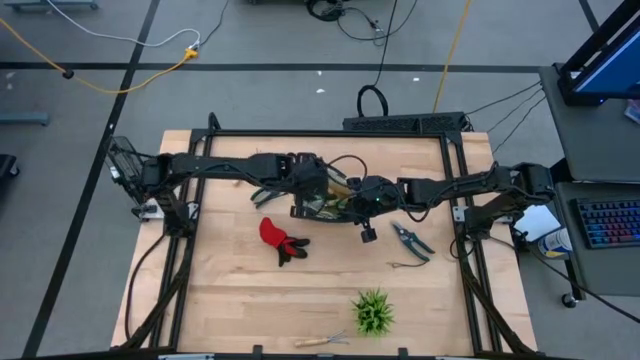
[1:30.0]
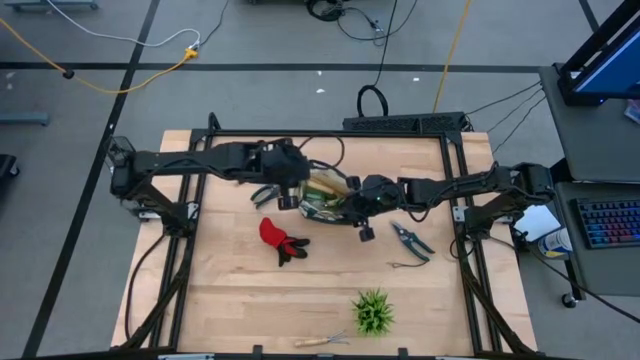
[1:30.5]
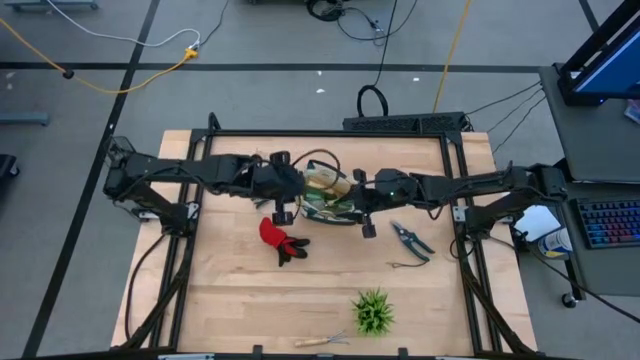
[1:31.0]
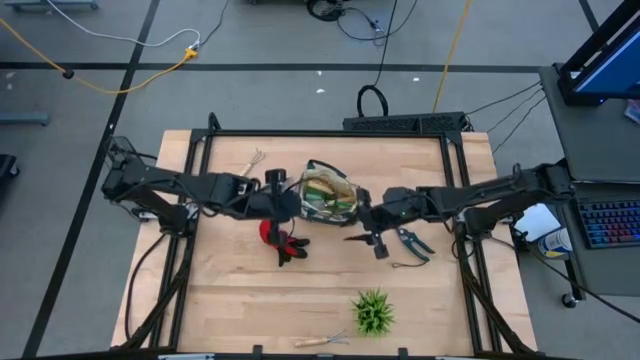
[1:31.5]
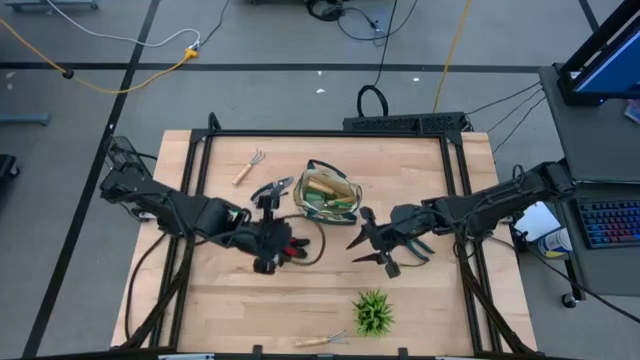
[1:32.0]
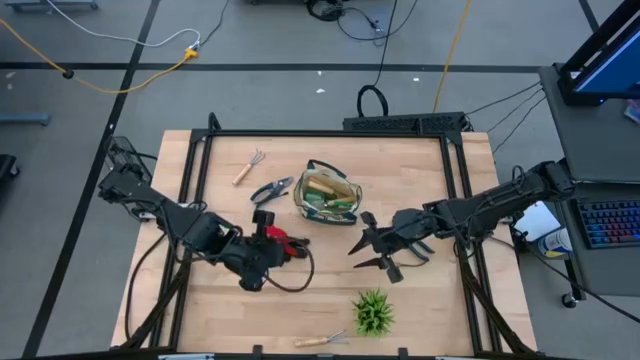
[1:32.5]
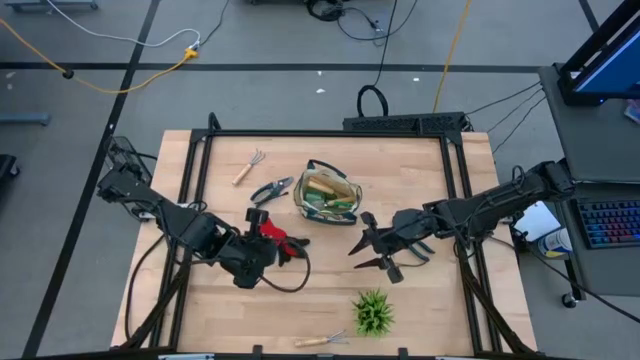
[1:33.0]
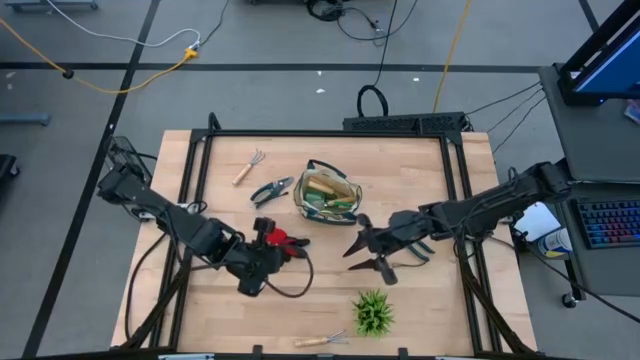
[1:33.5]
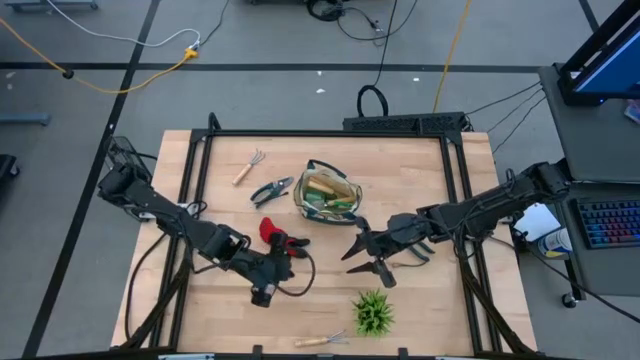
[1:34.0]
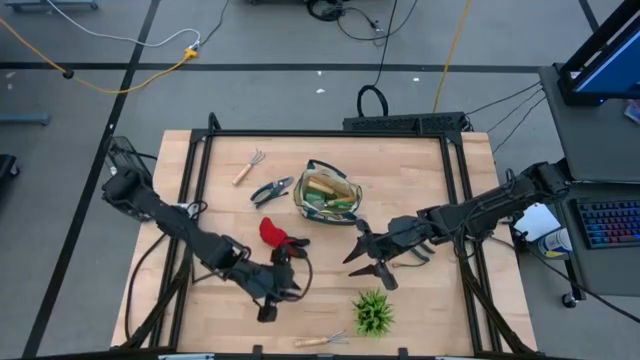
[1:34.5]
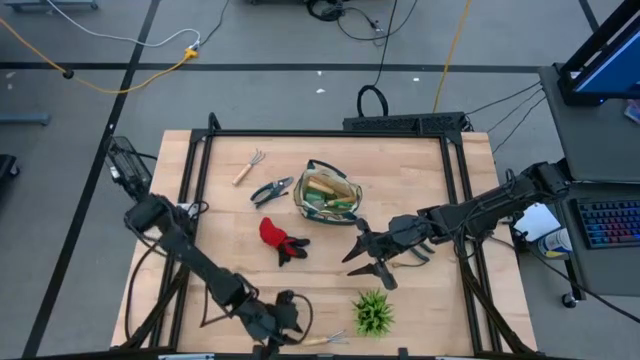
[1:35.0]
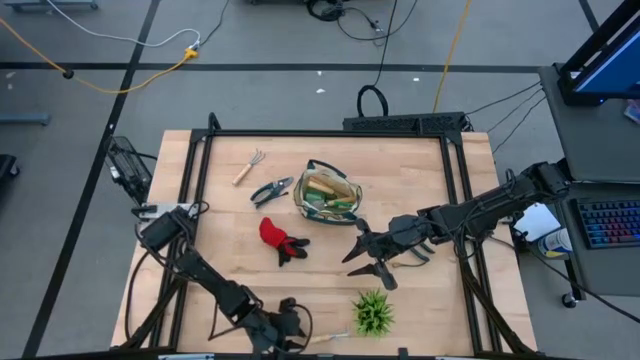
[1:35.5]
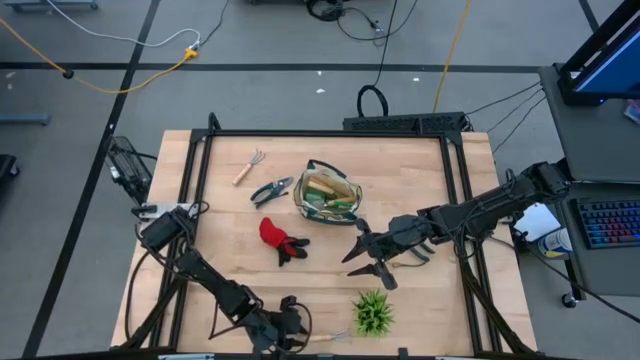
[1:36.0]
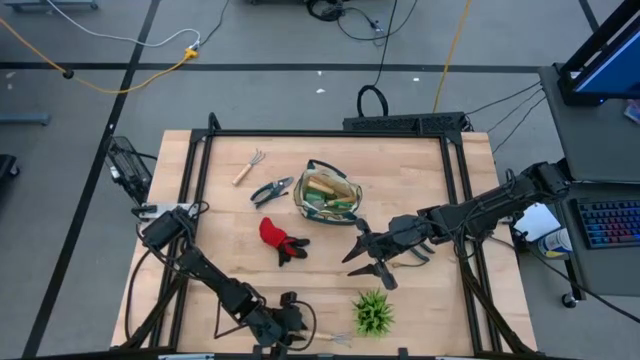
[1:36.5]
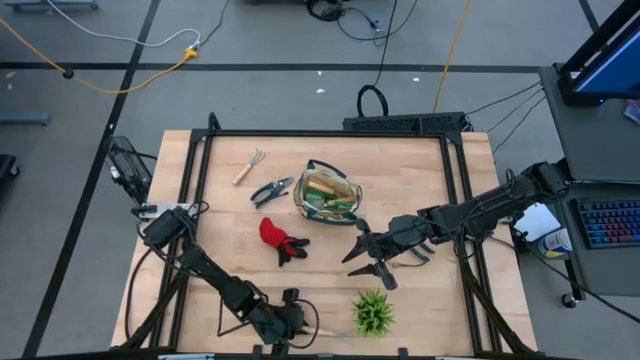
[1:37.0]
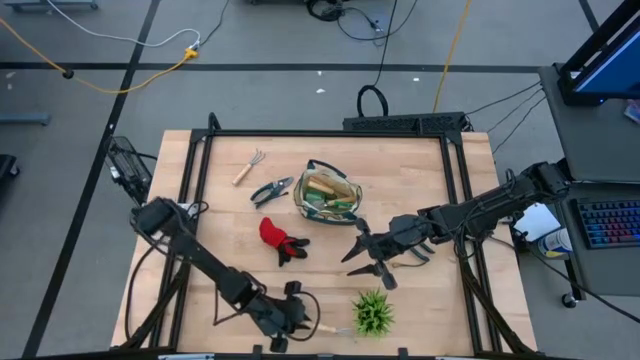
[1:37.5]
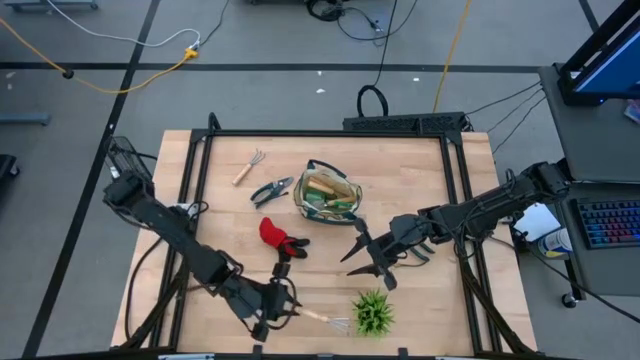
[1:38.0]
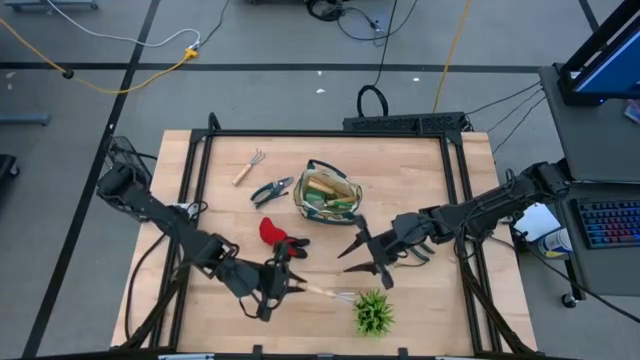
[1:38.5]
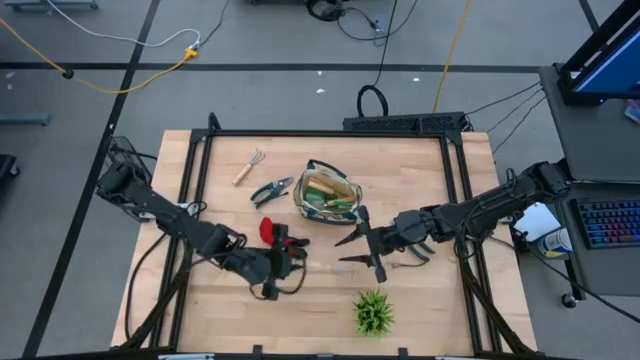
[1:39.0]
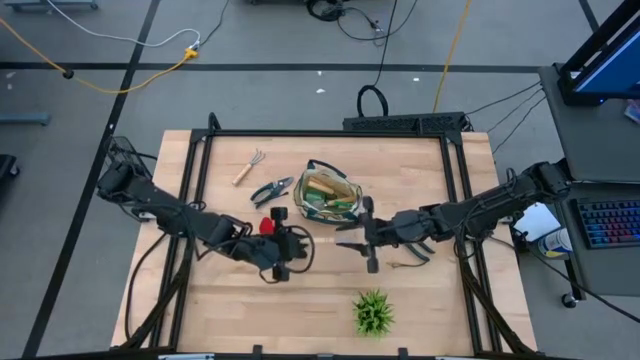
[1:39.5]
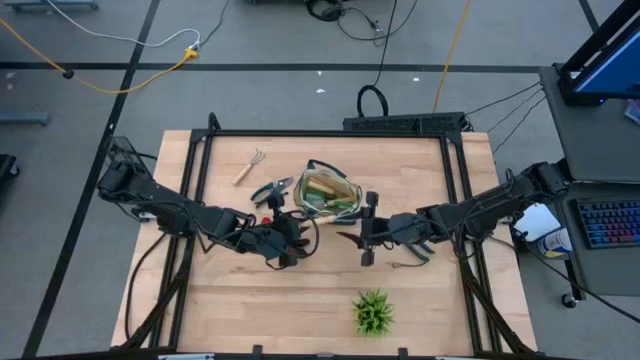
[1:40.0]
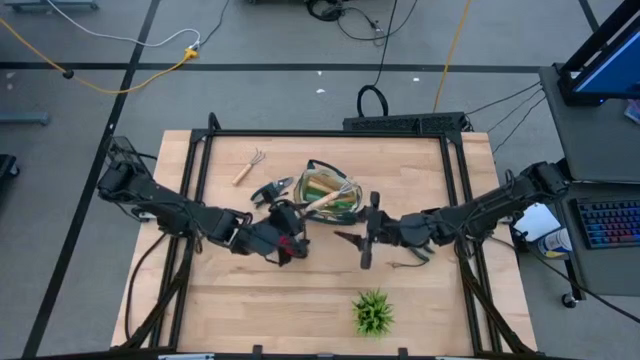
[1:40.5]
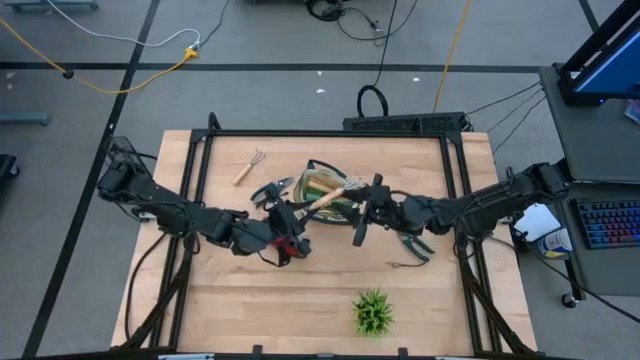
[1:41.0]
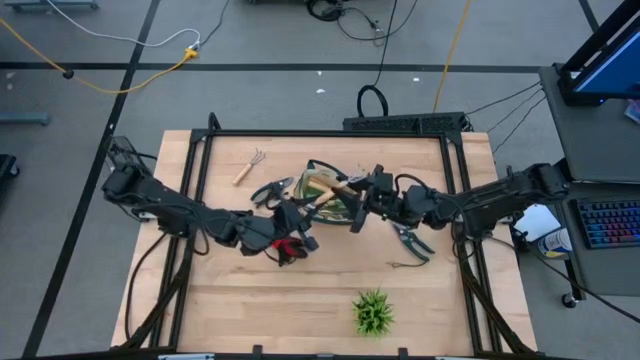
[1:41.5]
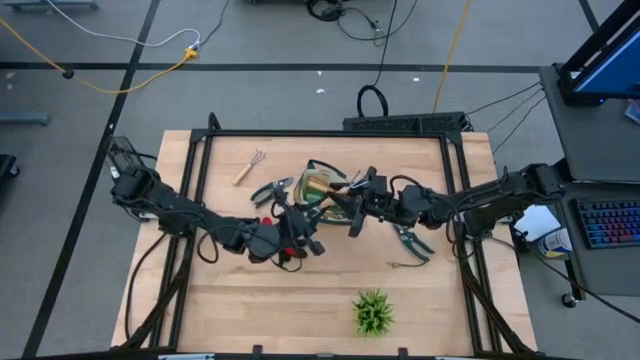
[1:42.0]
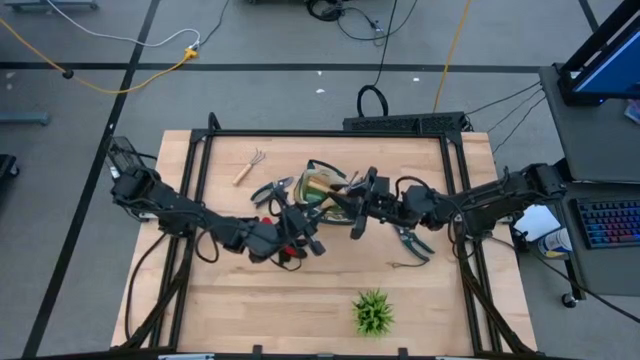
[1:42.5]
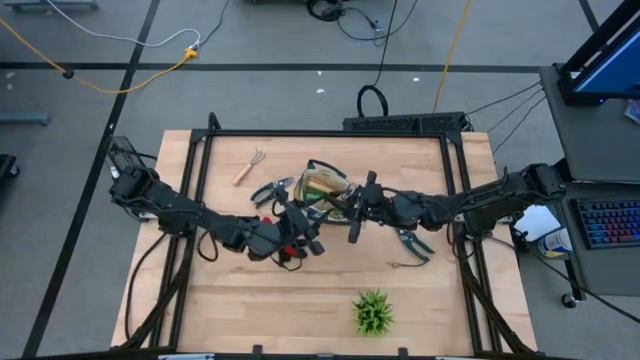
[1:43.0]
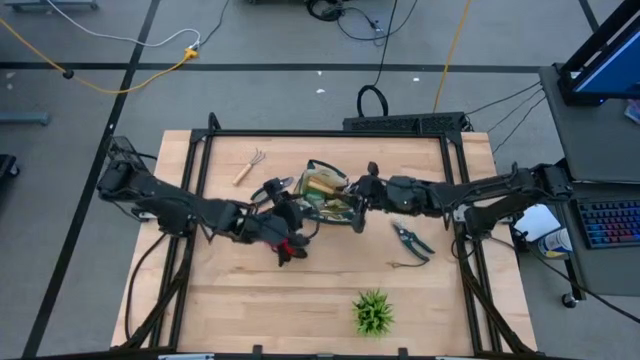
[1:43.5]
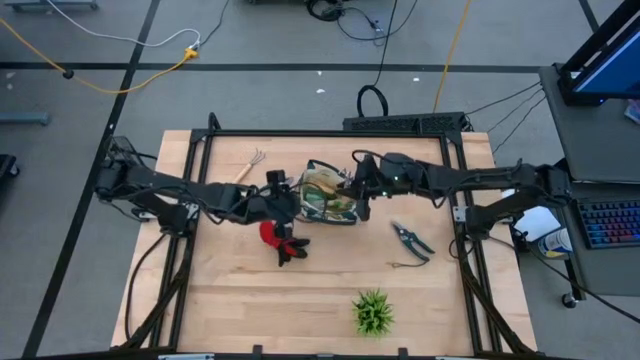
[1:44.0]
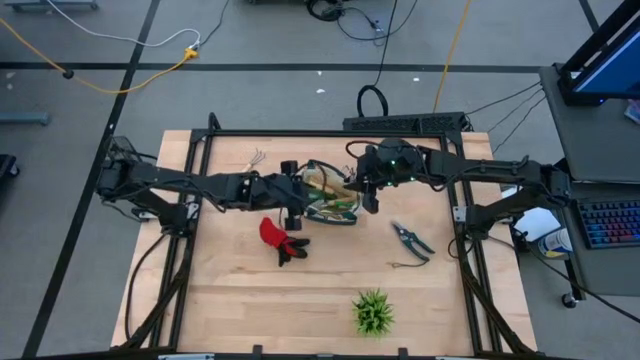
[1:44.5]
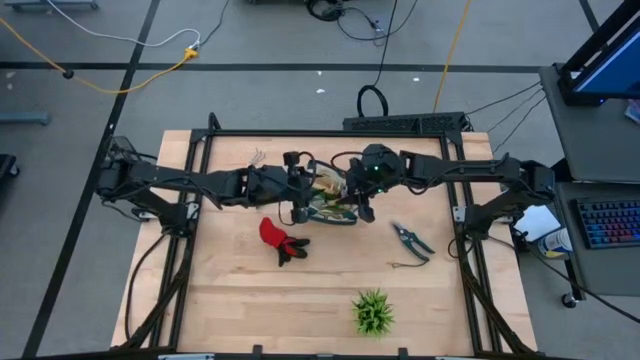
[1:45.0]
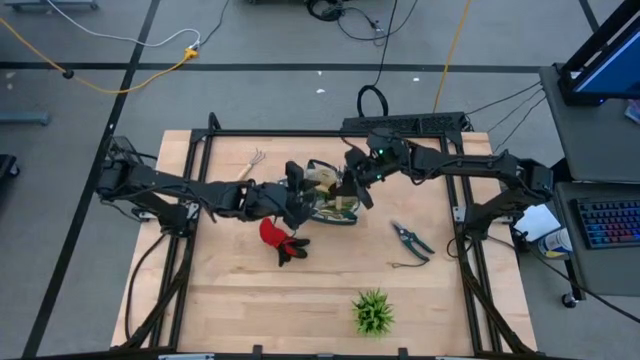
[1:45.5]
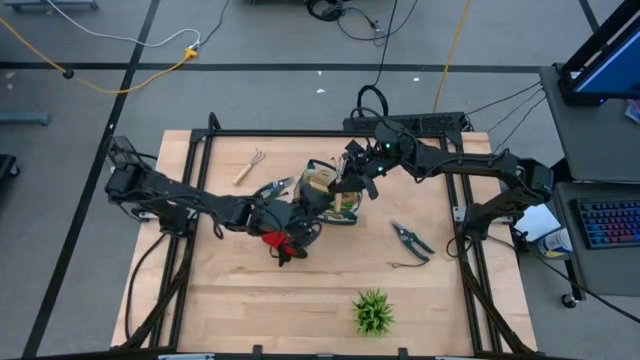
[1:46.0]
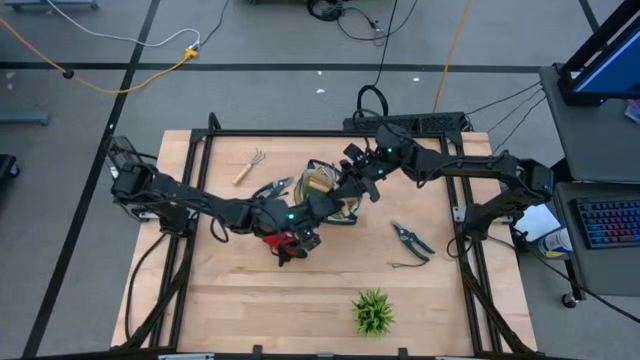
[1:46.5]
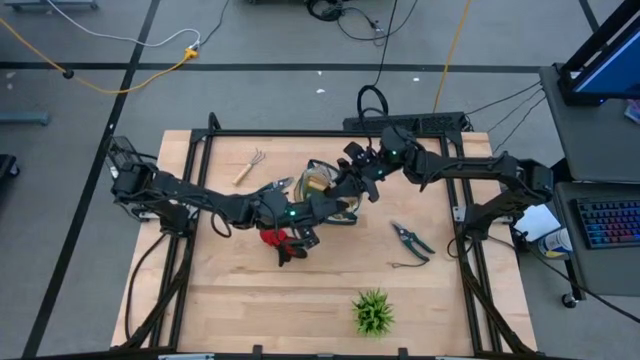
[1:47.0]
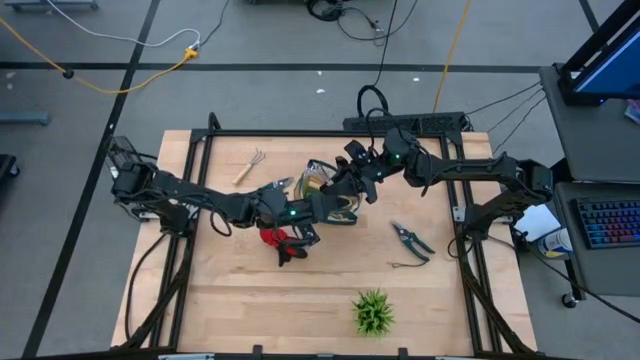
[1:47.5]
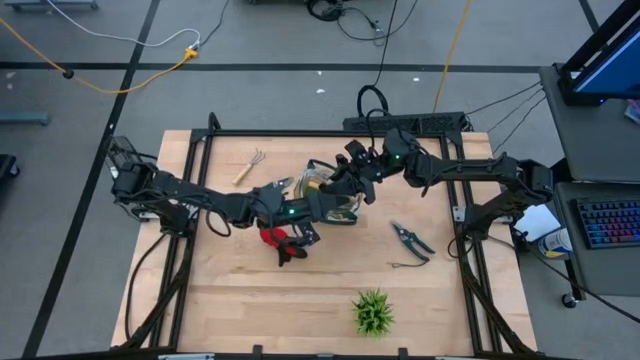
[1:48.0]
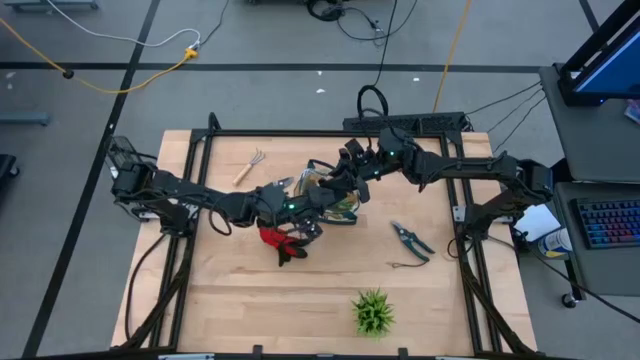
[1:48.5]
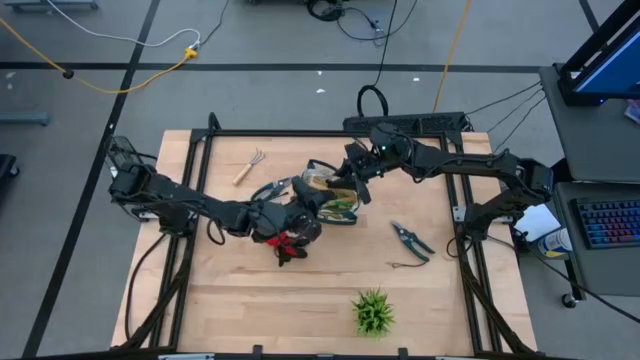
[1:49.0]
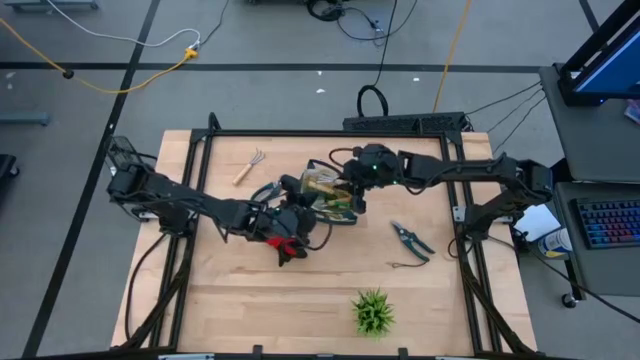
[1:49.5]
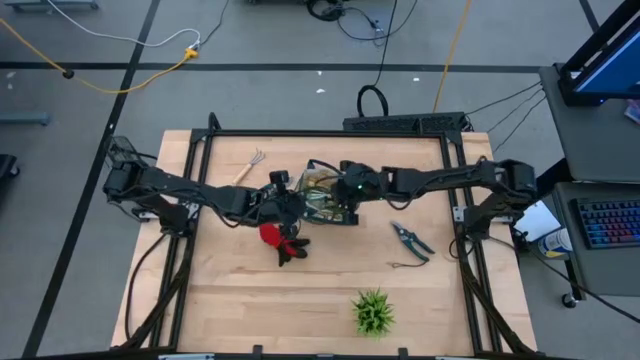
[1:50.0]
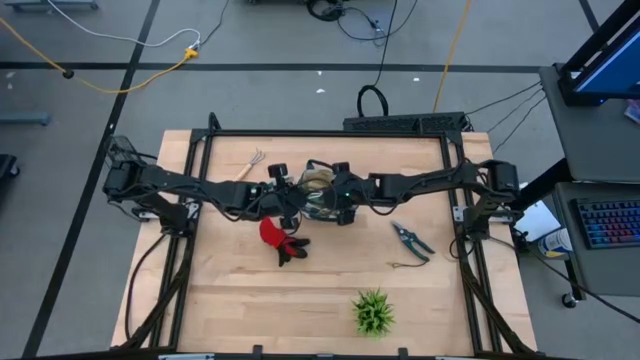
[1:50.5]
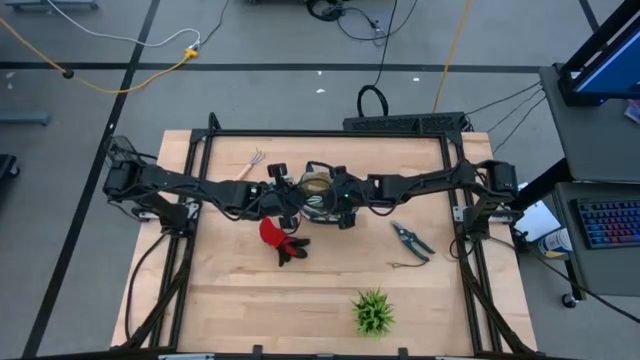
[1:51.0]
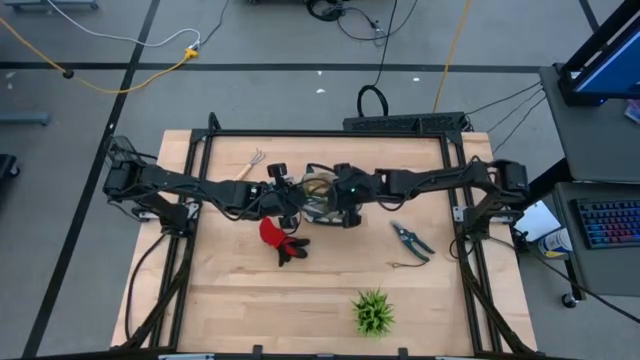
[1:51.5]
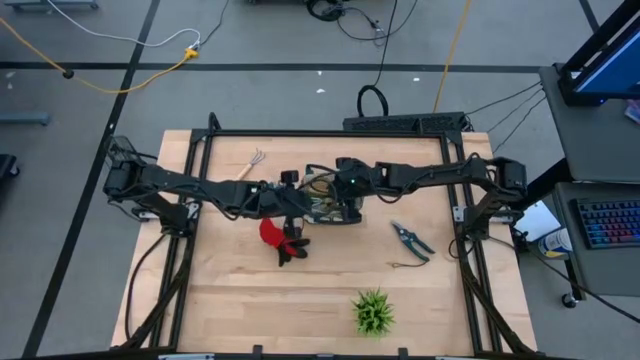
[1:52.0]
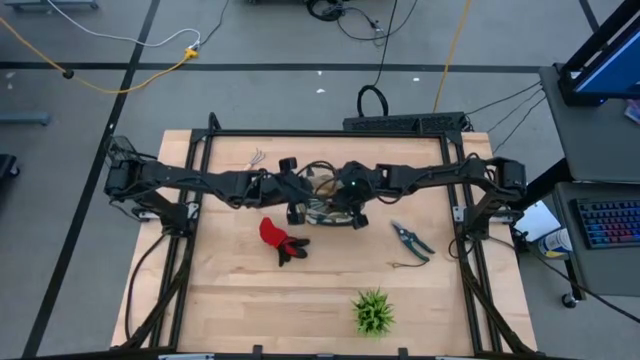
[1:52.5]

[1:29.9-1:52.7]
Task: Pick & Place Garden tools in Gardening bag
Put the bottom brown hand rake into the gardening bag
